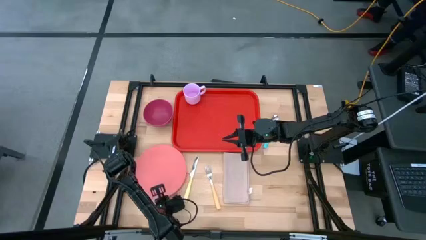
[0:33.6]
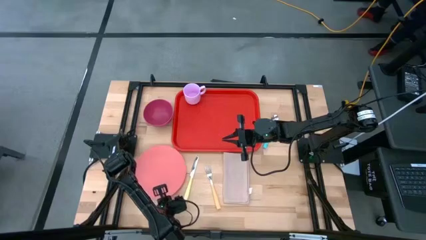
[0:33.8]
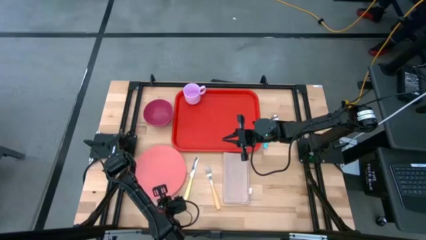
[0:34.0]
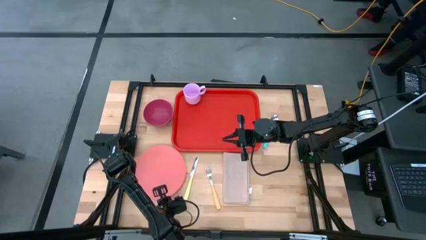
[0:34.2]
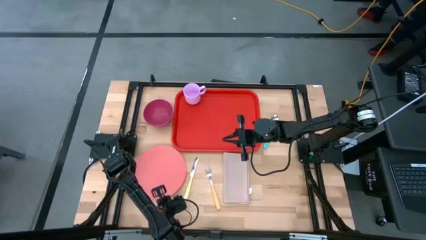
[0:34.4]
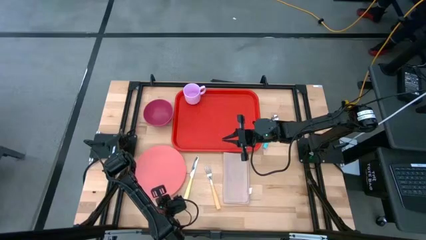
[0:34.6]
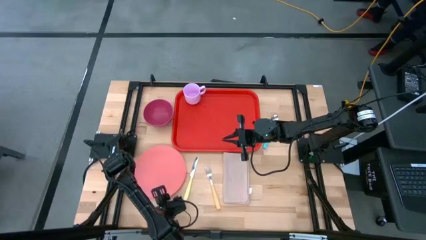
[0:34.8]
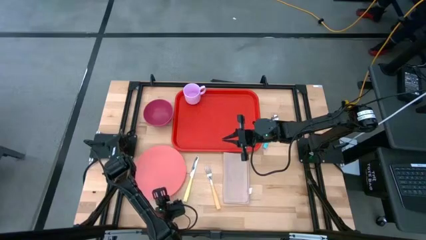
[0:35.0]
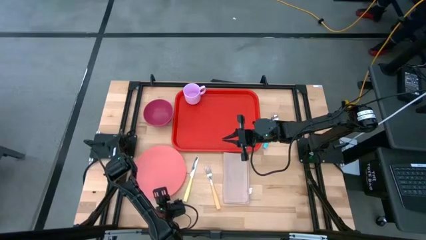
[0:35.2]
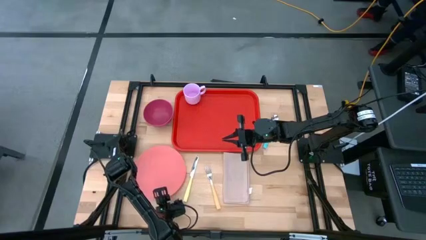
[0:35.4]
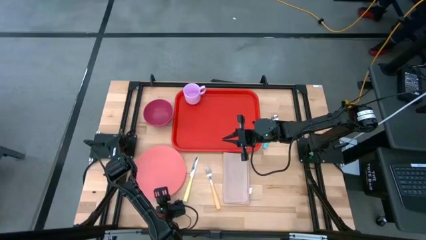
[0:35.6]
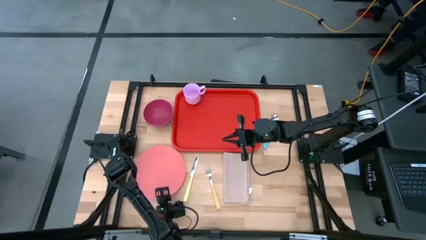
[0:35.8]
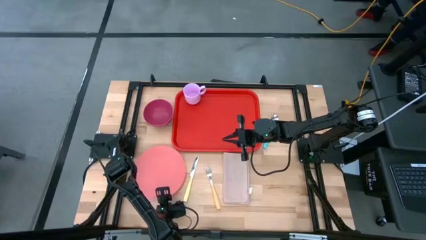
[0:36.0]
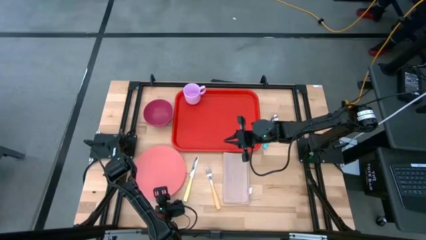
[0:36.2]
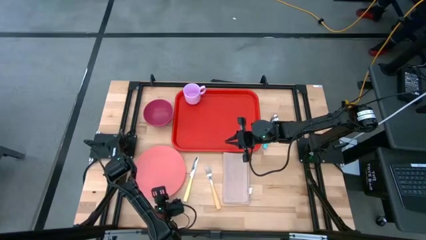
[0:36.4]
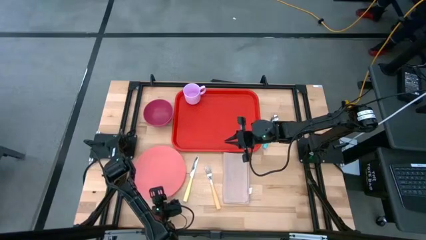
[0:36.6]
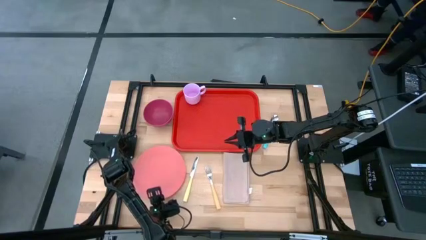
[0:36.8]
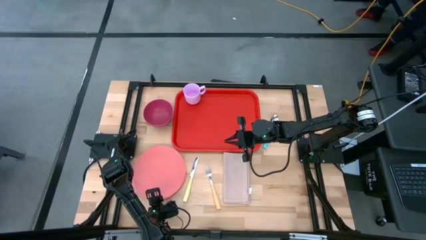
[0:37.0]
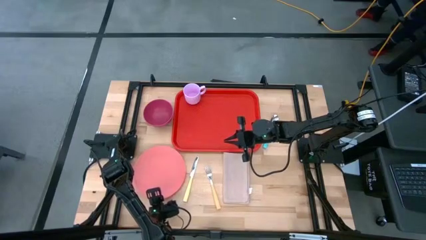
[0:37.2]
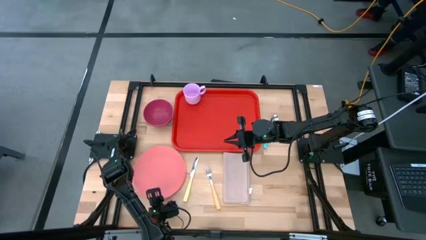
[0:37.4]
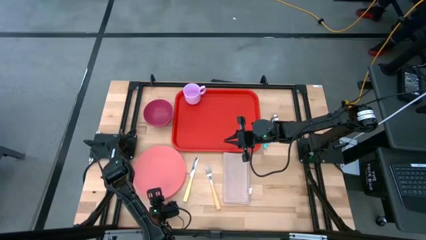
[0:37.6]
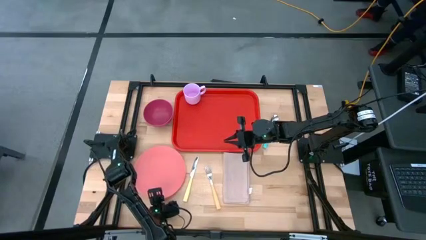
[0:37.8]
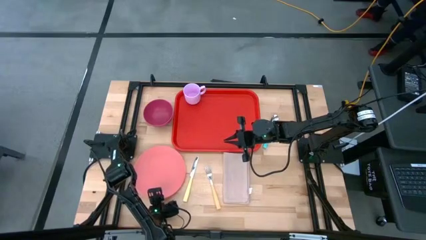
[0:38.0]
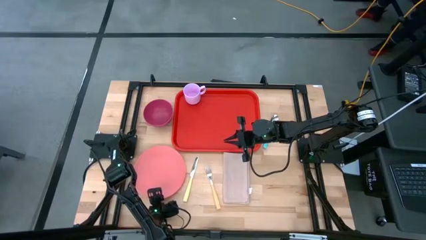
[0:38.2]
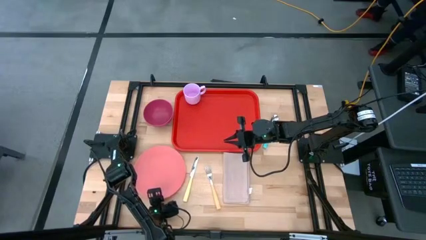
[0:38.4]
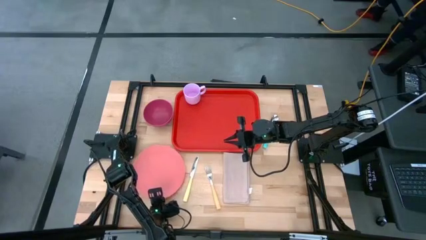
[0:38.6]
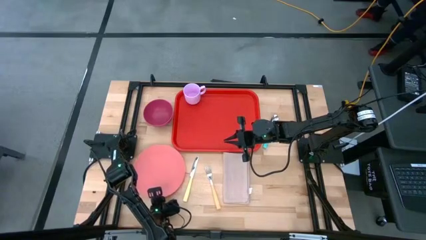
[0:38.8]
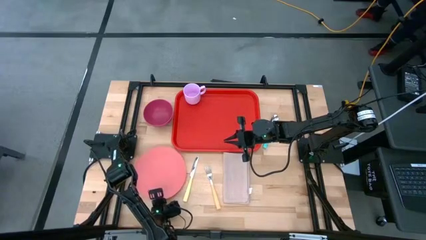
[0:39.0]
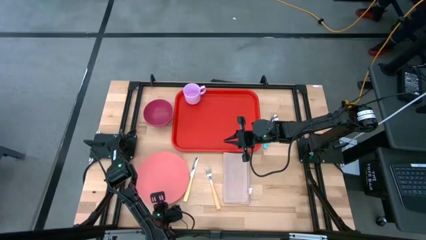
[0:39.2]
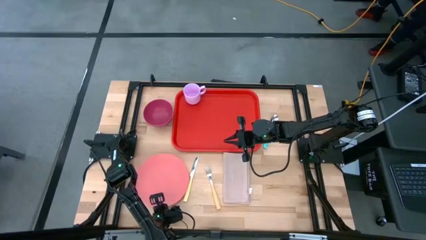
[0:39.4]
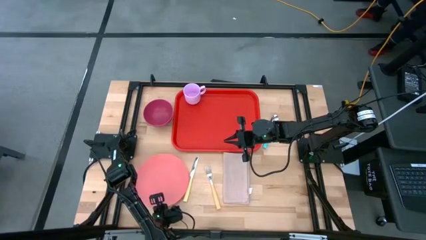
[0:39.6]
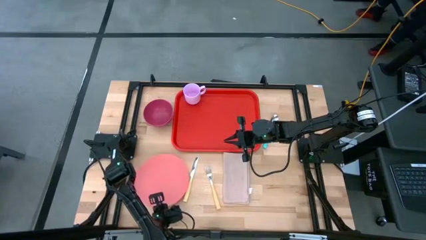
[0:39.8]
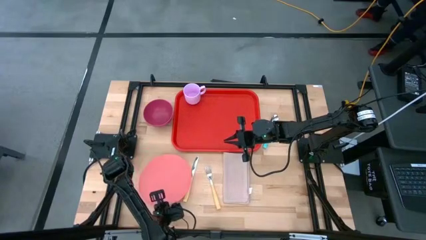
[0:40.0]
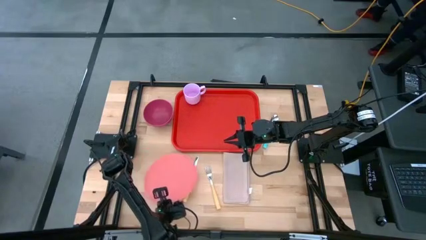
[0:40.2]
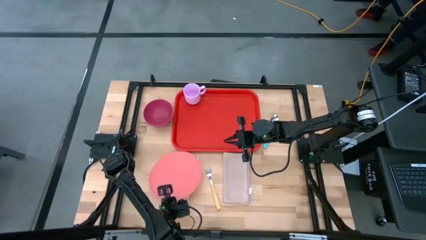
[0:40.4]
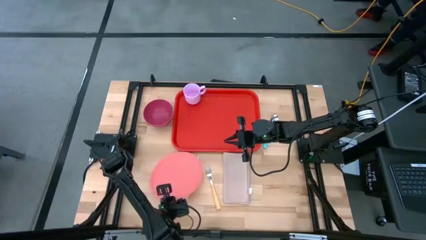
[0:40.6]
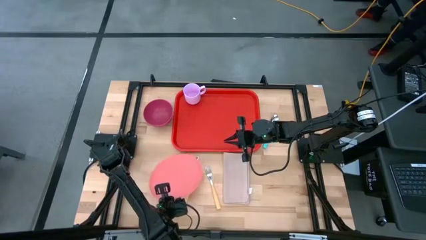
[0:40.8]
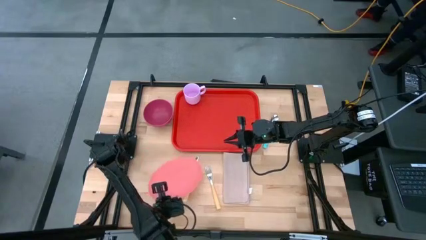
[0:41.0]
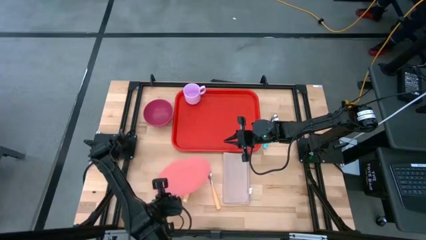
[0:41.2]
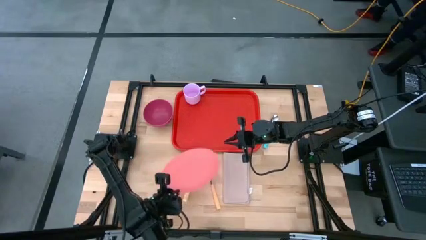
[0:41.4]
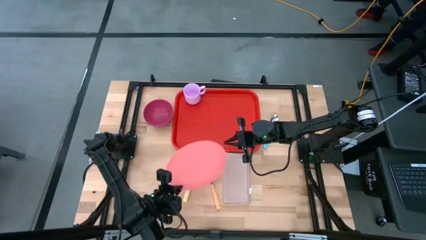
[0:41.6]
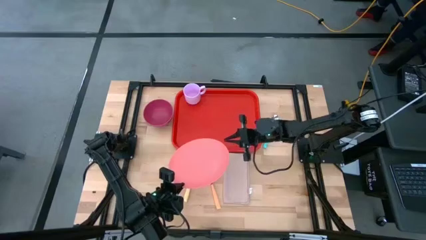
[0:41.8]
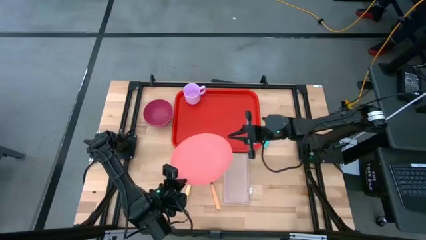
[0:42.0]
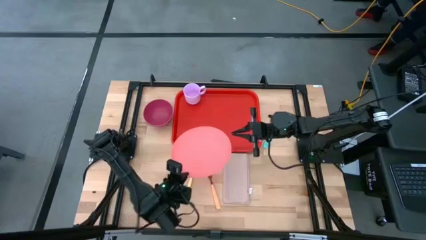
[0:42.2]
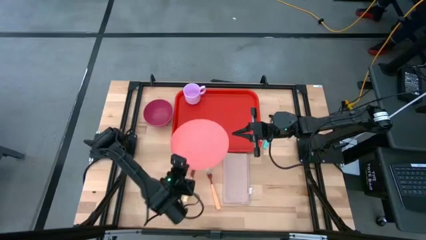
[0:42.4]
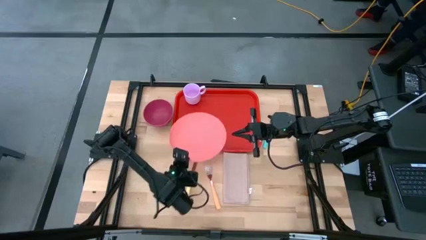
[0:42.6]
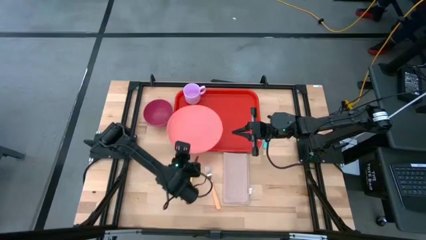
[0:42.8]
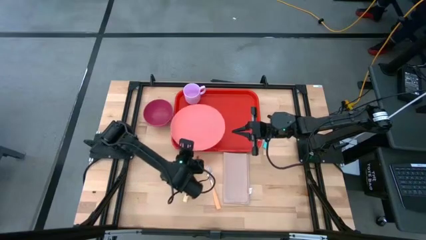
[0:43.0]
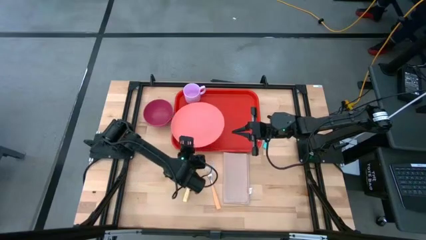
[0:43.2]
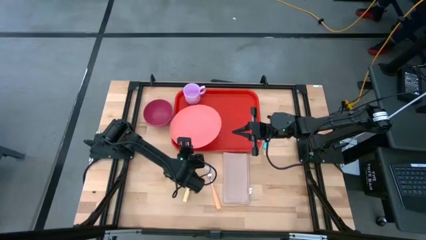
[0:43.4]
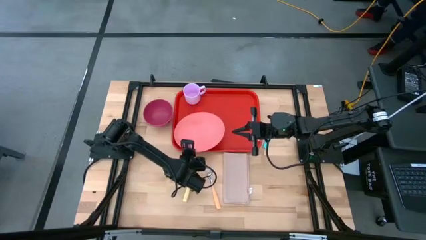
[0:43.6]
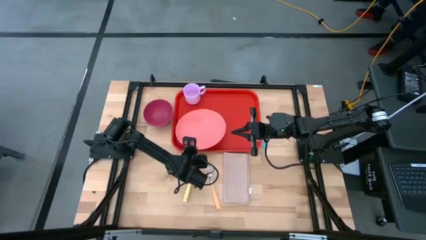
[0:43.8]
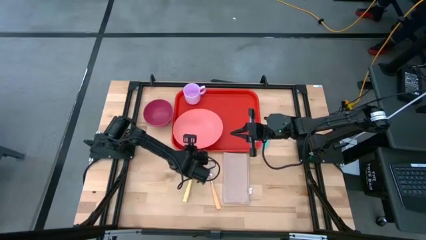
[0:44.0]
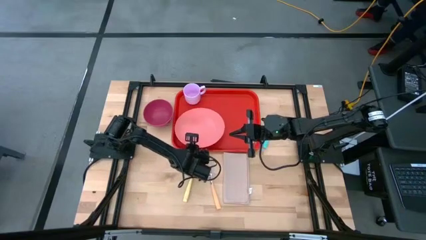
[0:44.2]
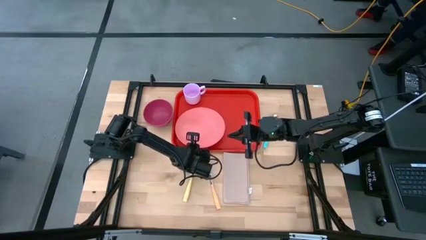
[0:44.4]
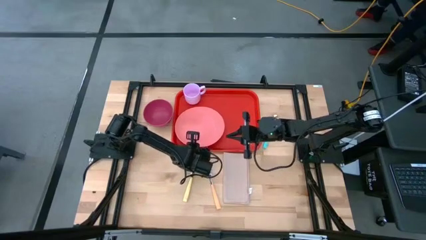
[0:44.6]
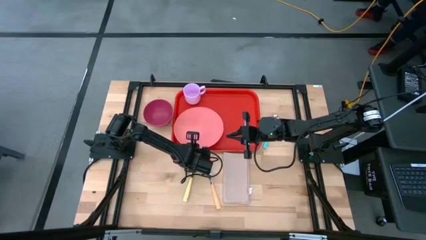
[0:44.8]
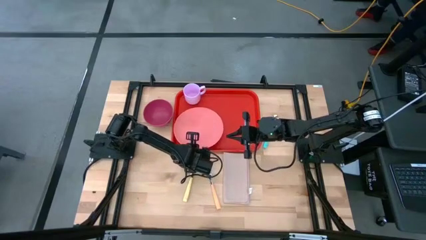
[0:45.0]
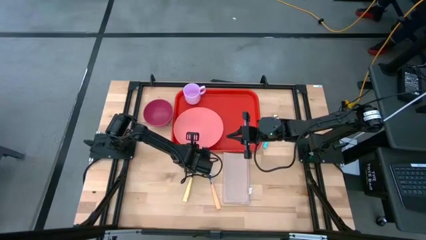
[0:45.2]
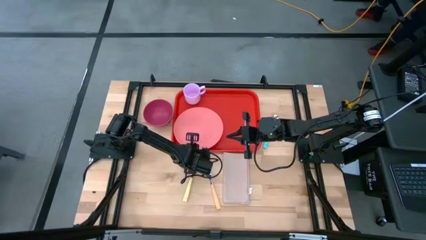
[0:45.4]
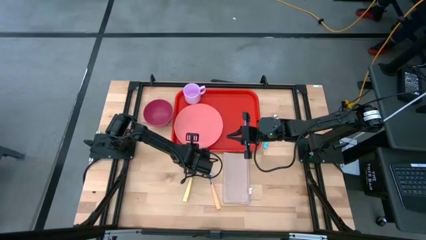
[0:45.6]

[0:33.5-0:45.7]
Task: Set up tray
Put the pink plate on the bottom left of the orange tray

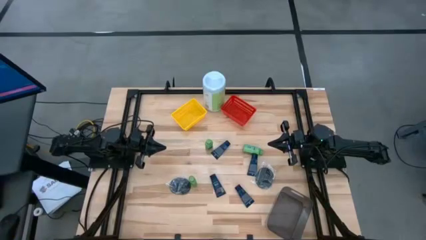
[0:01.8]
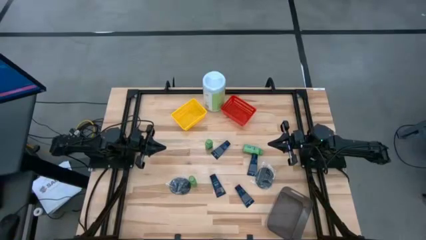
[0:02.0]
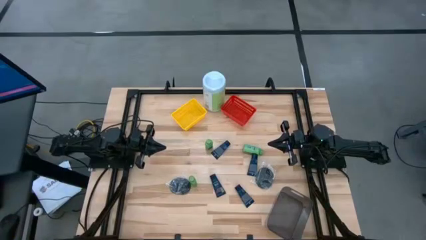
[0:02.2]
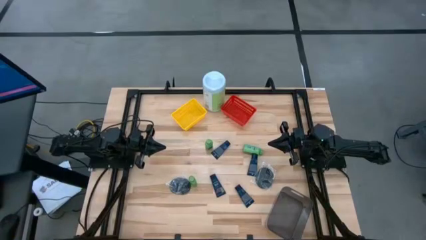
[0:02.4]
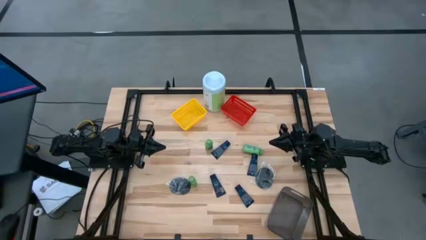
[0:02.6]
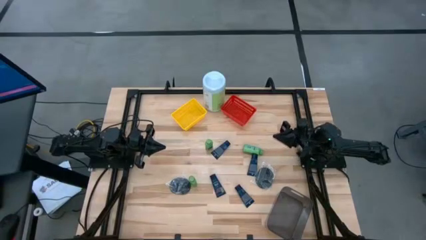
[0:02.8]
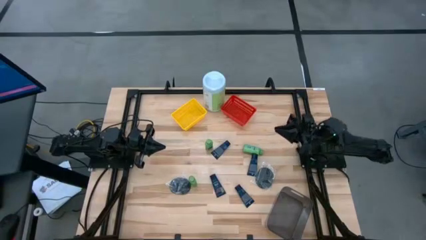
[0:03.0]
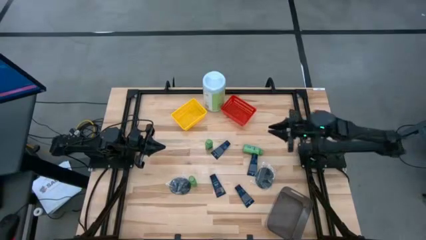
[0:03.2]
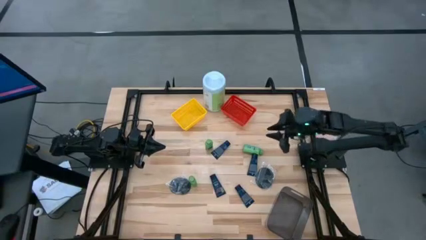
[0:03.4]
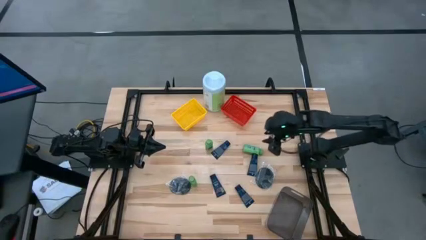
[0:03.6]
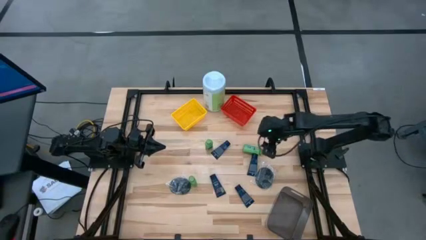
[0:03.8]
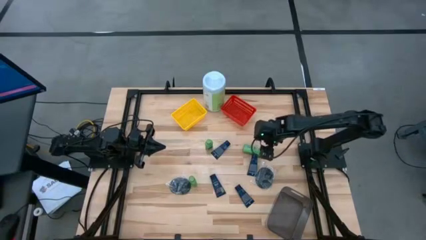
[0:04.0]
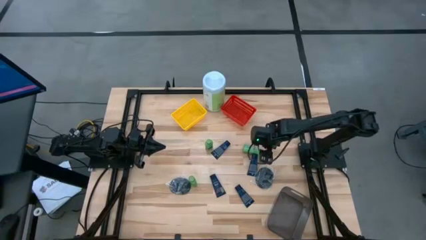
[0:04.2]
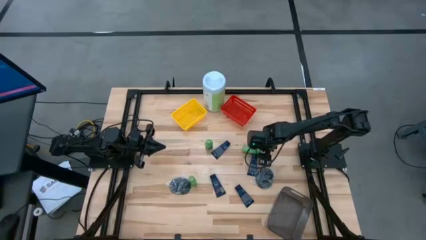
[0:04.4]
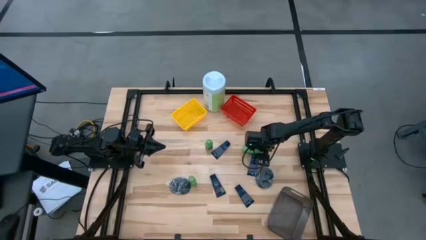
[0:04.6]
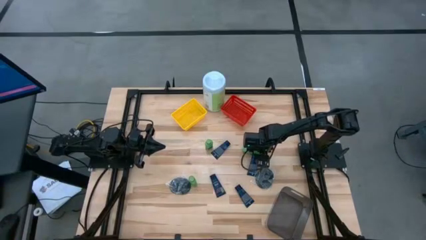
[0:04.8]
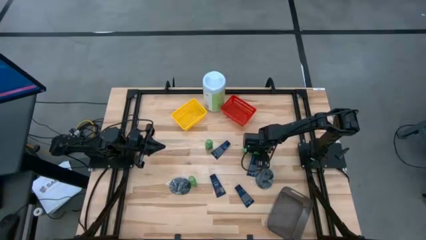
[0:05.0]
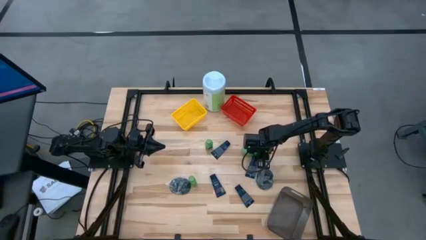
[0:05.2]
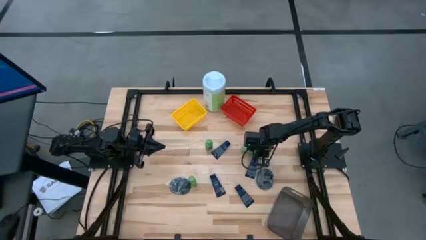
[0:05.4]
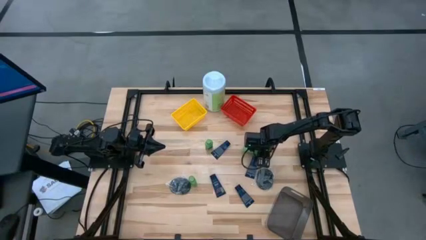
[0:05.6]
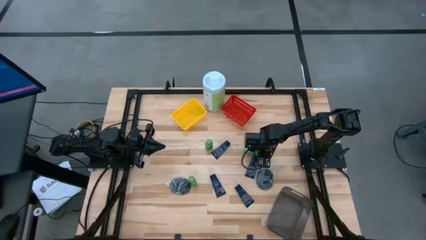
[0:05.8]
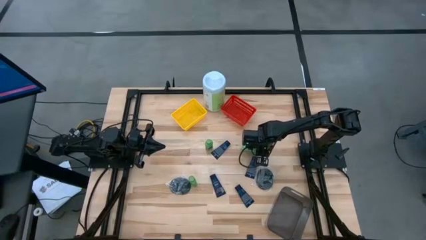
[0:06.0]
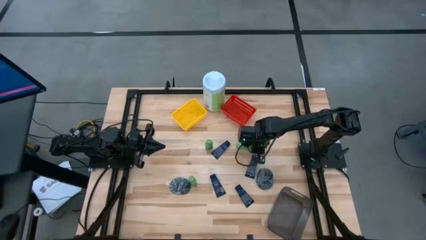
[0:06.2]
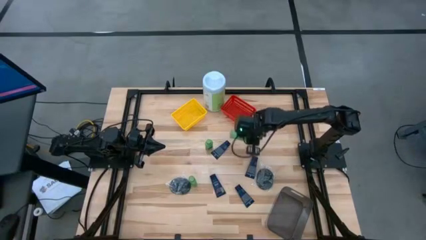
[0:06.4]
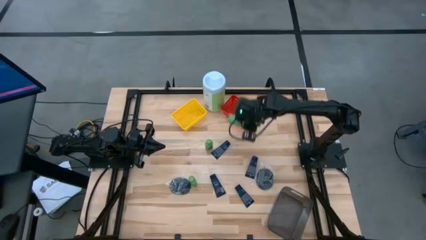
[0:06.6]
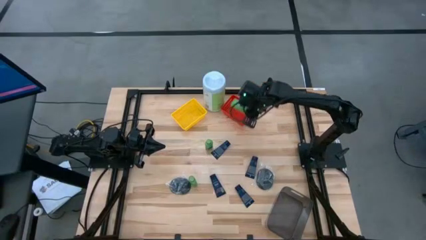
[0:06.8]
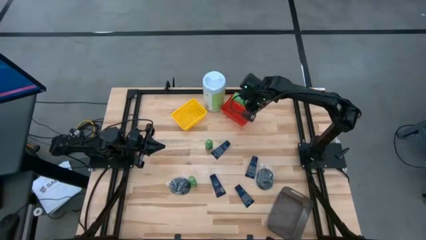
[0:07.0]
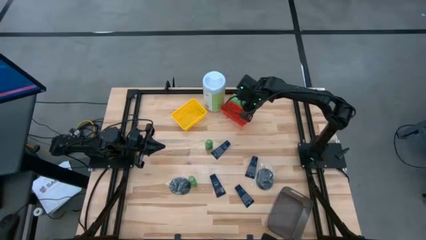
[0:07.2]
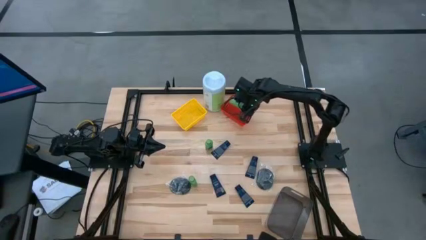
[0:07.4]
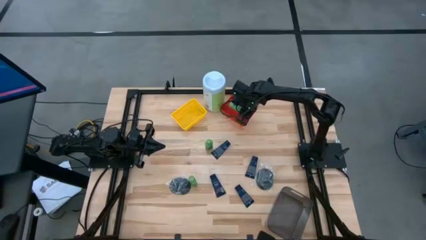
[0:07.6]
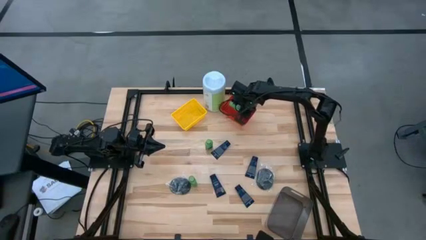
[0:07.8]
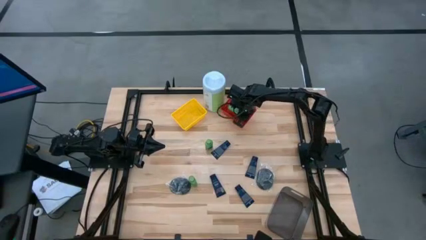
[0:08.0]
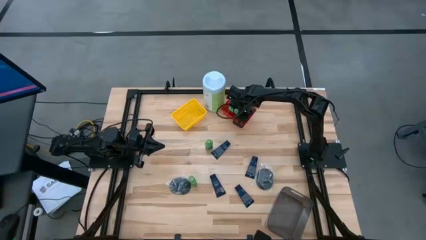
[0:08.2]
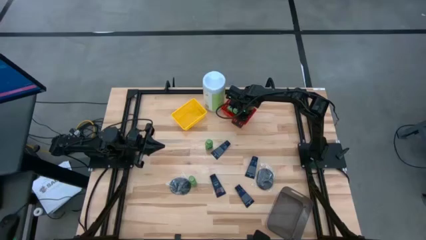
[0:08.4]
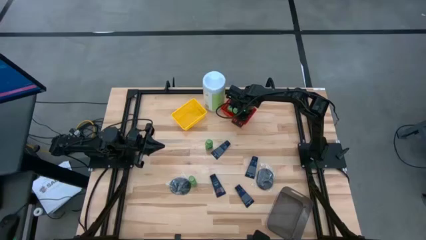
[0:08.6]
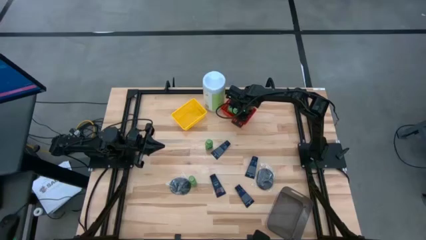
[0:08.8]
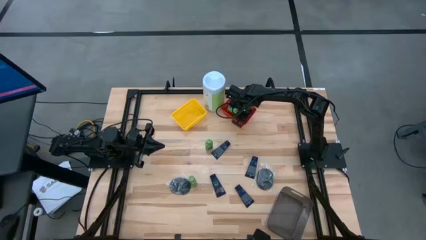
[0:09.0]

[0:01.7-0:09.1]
Task: Pick & Place Travel size toiletries
Put the green shampoo bottle in the red bin
